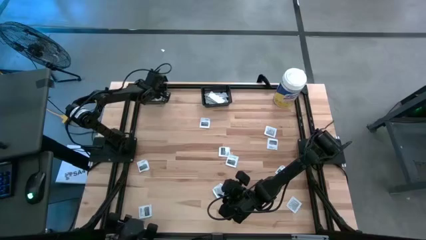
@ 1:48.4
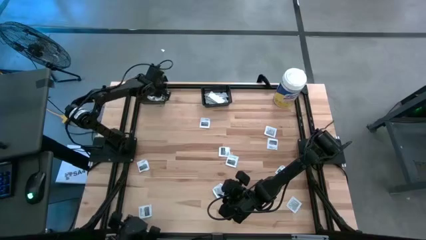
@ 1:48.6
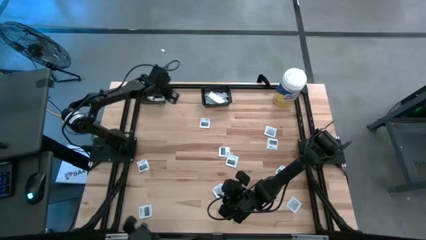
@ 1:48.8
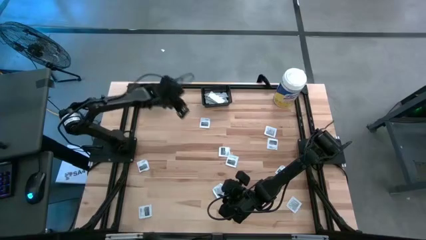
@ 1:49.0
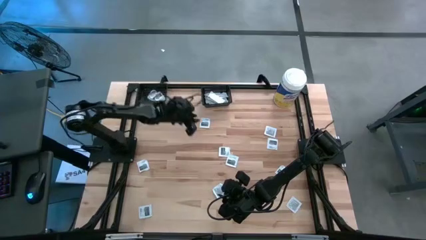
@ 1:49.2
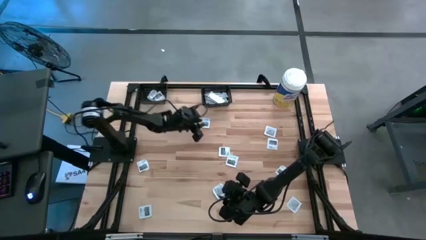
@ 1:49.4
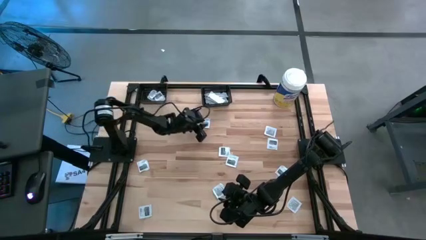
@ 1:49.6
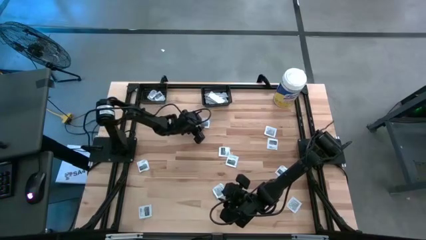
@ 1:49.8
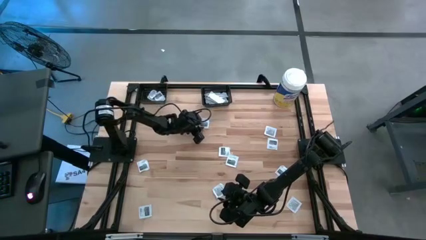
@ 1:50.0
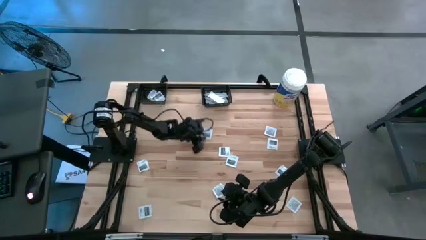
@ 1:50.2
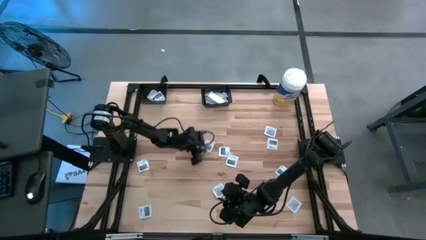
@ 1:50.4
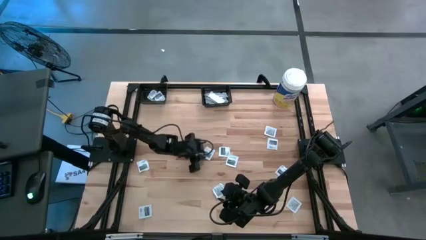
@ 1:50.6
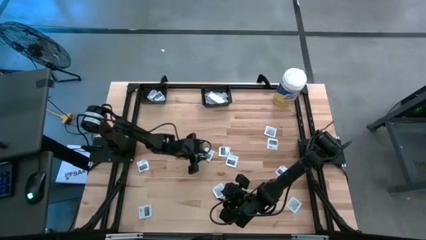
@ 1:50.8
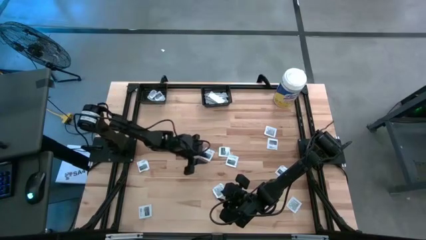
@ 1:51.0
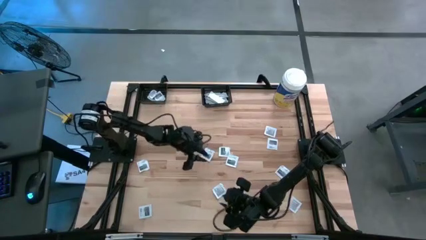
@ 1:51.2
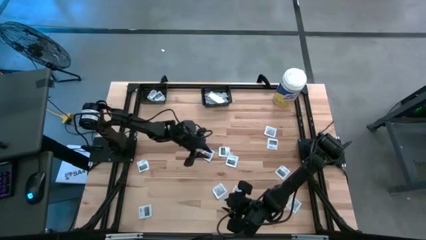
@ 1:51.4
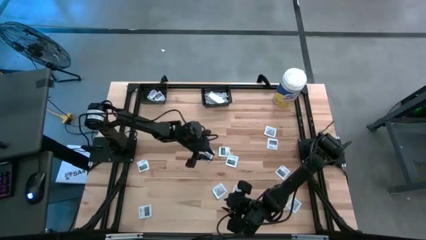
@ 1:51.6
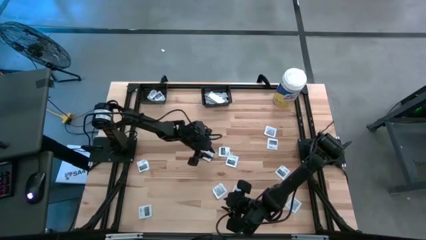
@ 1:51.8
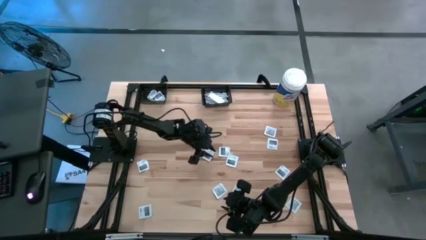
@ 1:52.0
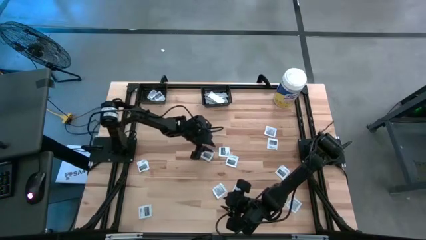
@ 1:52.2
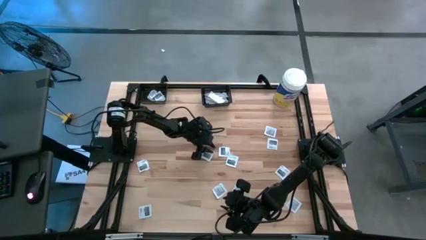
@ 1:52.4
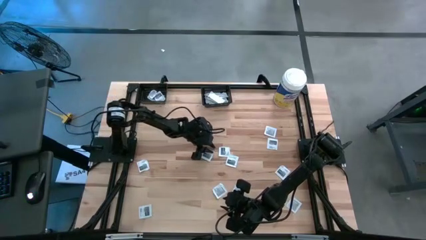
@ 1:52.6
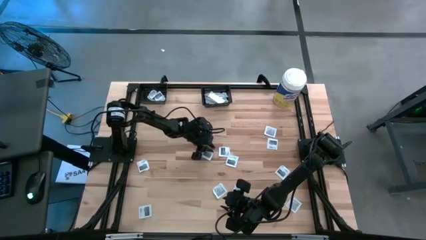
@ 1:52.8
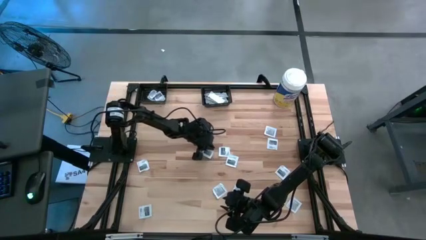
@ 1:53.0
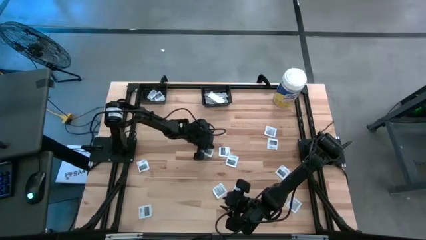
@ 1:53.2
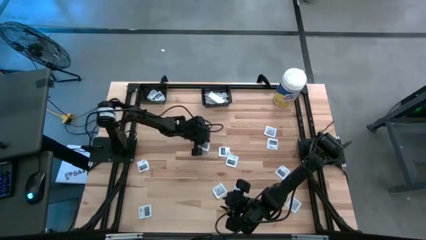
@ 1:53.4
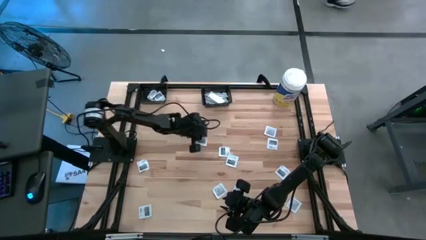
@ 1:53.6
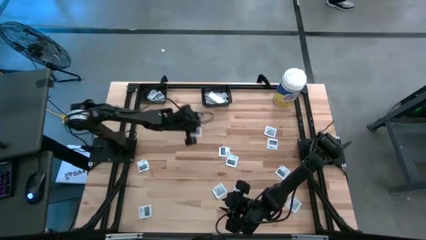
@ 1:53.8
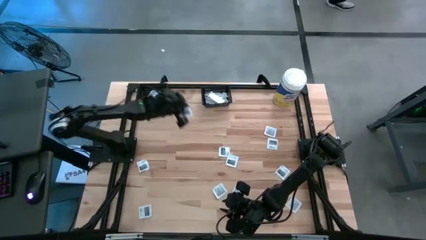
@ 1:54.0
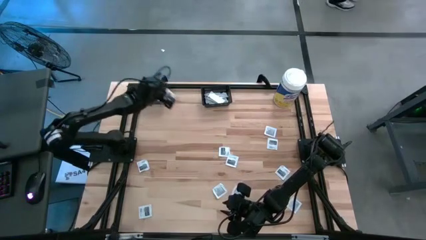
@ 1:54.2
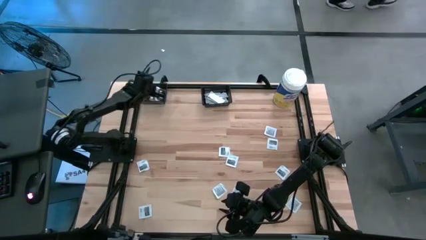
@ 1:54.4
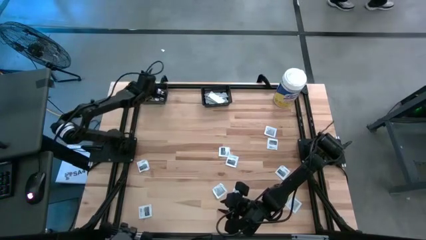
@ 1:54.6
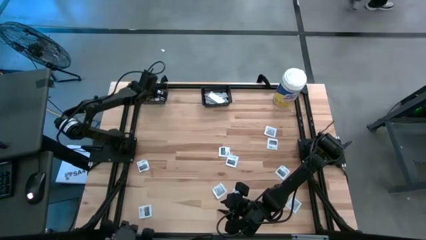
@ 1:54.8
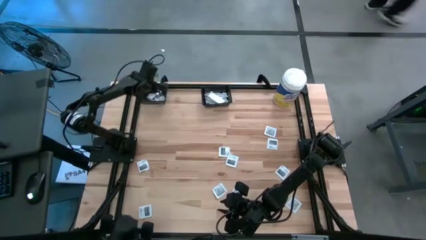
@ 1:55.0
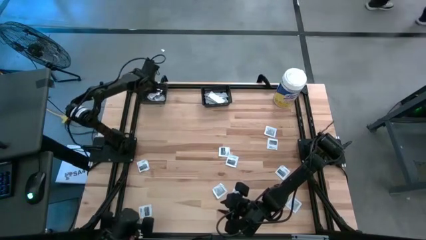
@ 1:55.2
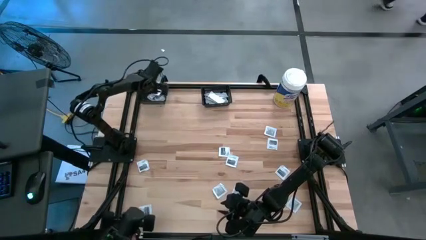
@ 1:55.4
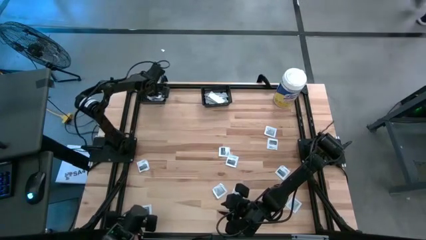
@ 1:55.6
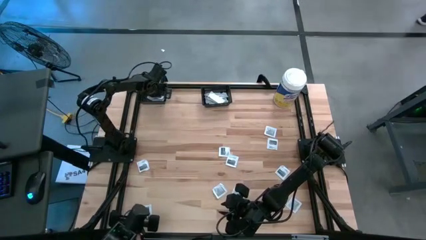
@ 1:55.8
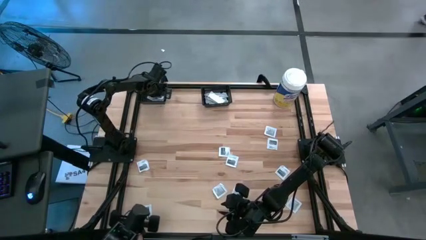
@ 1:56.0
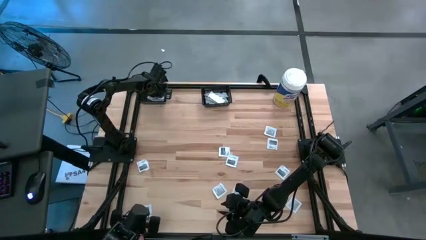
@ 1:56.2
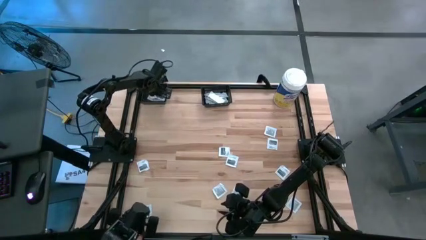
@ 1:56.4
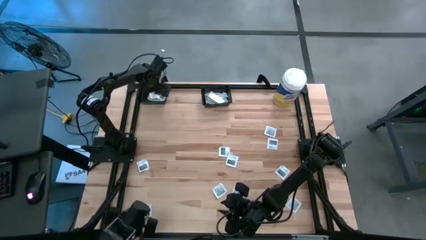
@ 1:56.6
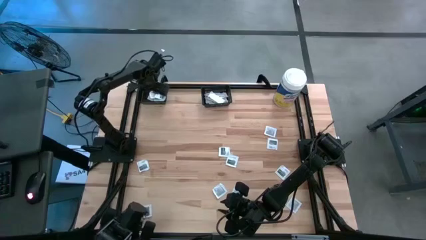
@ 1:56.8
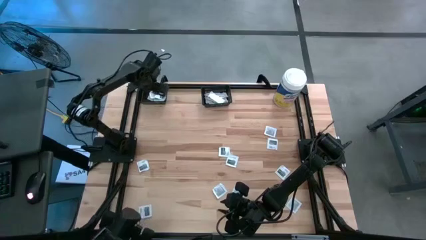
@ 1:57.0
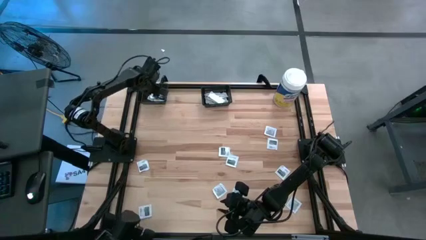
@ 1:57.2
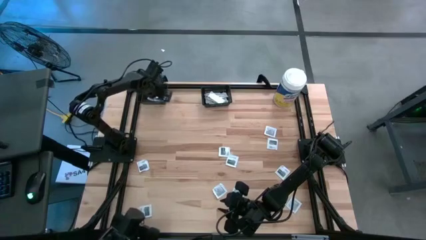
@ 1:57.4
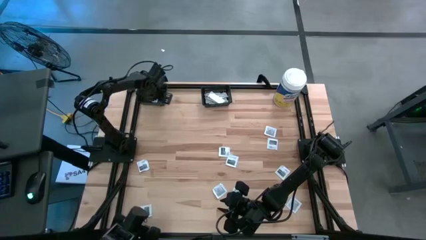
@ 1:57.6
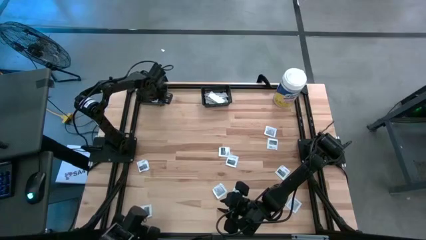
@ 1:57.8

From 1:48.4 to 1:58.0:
Task: Pick & Place First Aid Supplies
Put the gray towelette pack into the left black bin

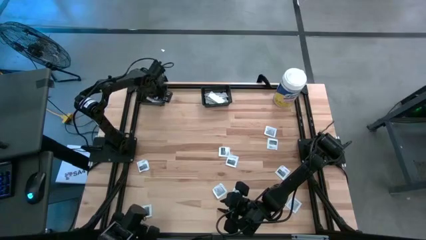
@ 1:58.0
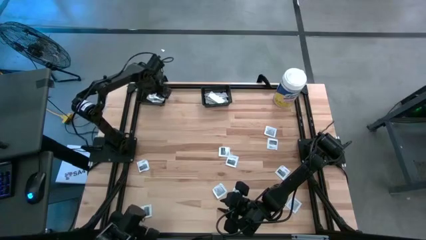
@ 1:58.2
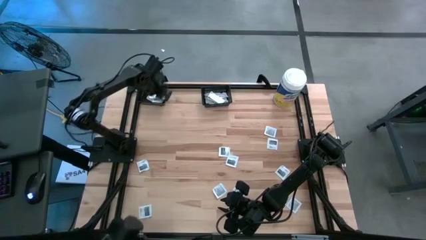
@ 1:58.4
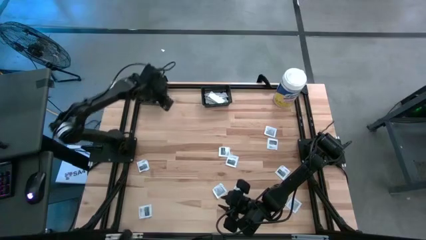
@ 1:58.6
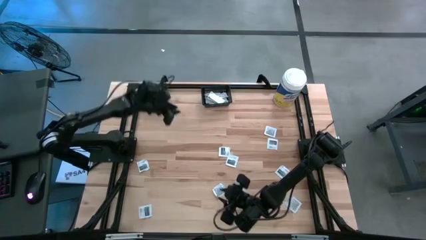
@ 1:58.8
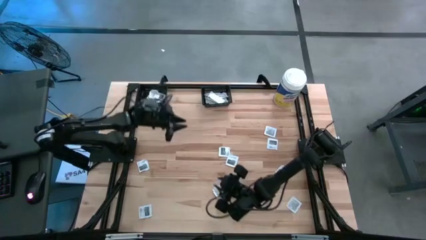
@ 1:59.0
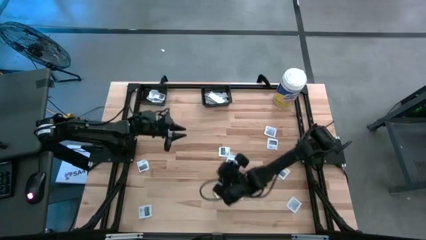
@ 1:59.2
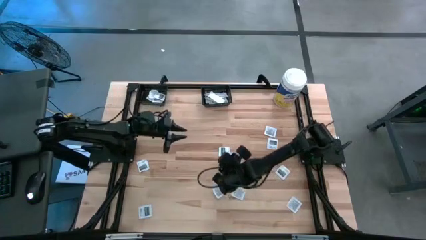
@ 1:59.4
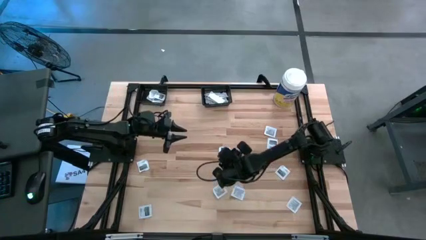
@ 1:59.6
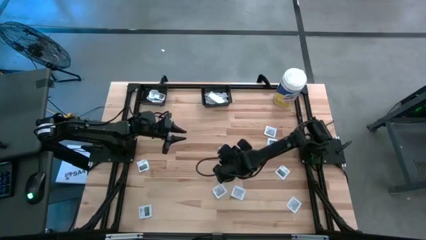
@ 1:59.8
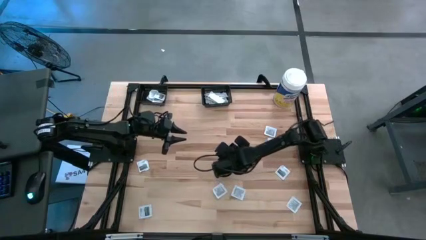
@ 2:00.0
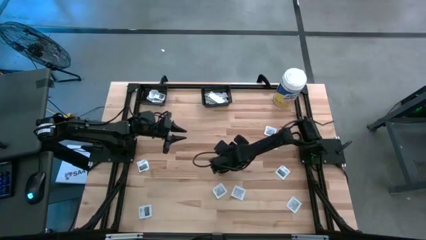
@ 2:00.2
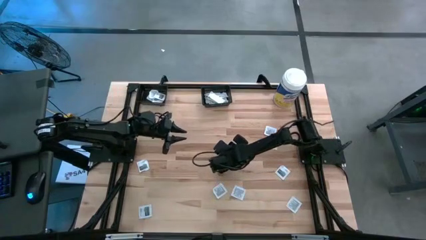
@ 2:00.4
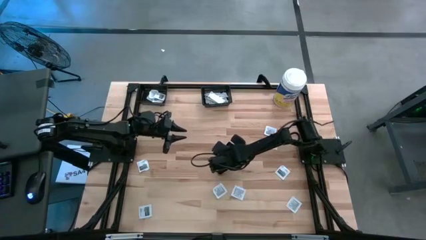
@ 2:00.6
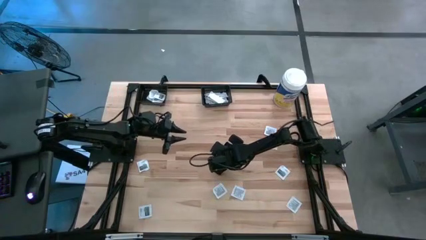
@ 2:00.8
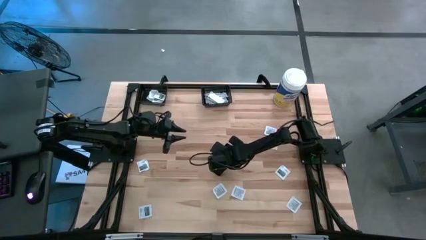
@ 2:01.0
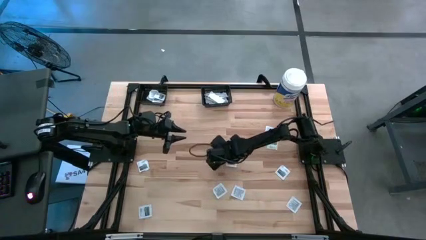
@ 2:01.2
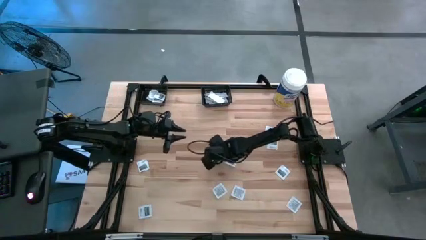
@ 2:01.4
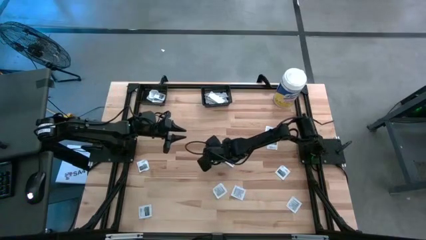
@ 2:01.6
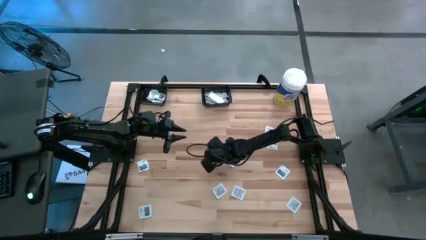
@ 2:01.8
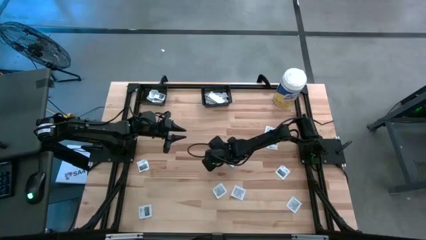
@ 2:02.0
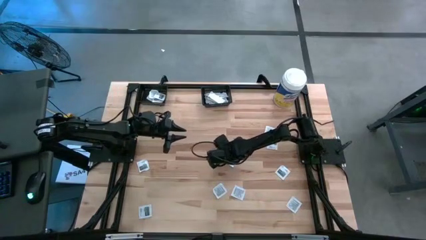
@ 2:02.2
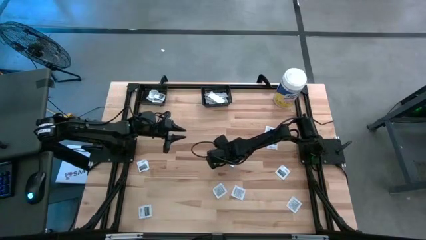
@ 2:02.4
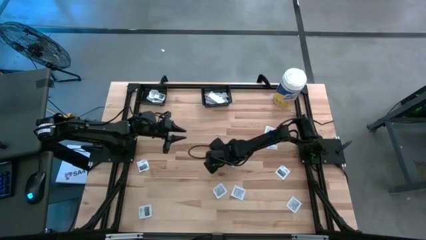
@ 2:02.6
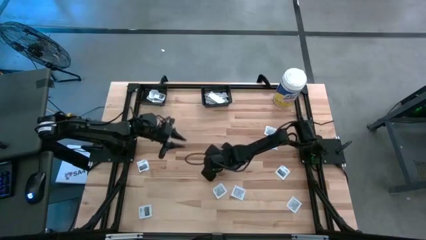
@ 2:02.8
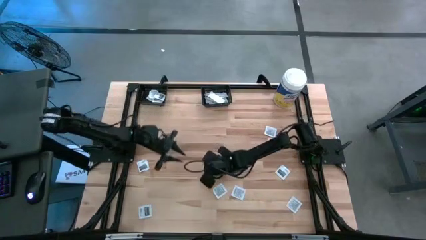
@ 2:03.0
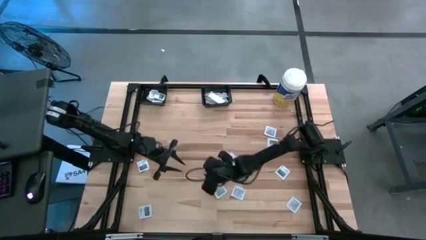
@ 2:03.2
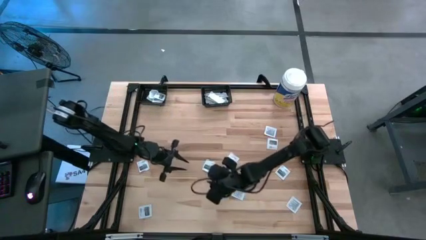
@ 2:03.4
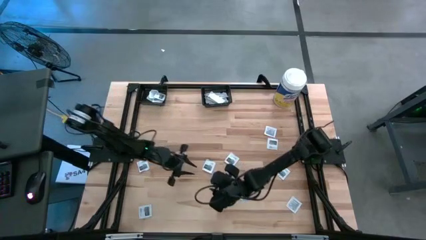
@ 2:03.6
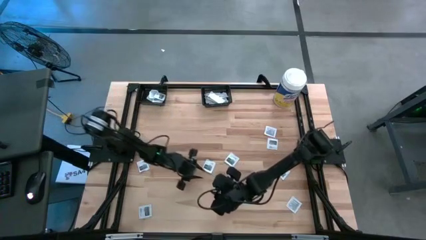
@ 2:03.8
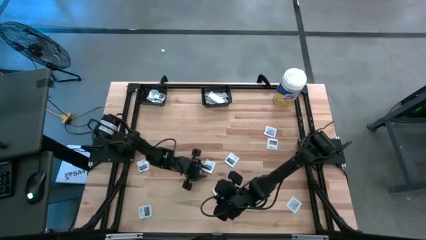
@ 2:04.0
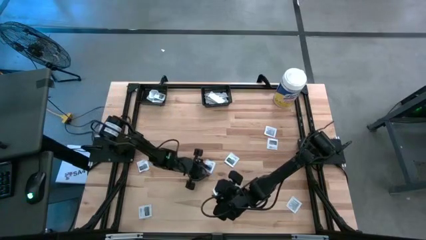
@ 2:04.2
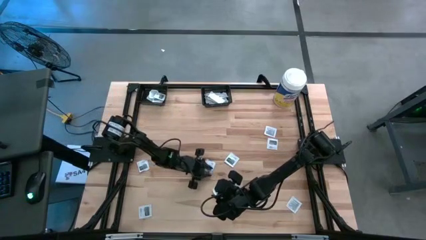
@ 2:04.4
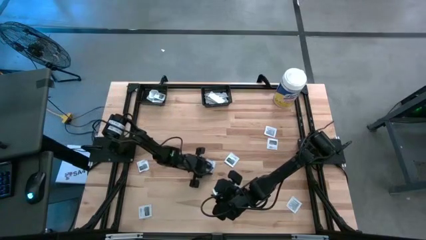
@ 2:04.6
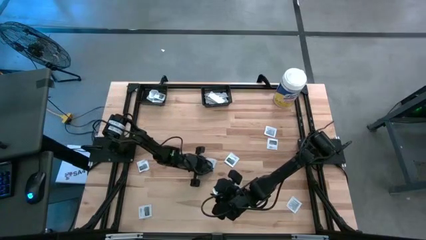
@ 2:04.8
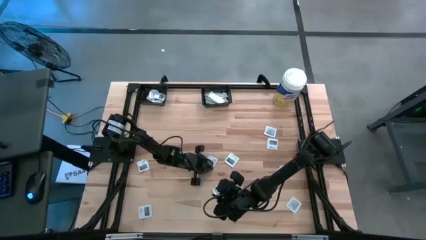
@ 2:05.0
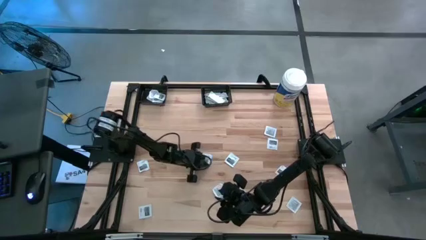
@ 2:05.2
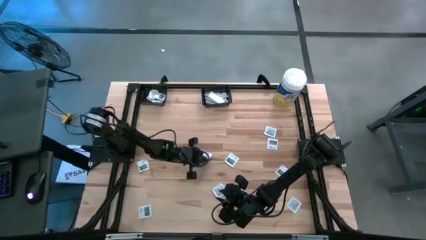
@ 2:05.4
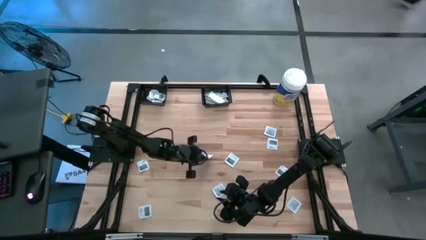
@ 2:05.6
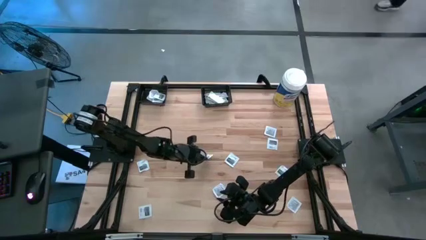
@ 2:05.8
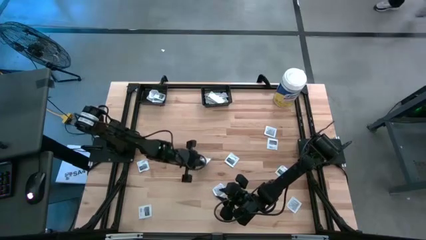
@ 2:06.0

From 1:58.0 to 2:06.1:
Put the gray towelette pack into the left black bin
